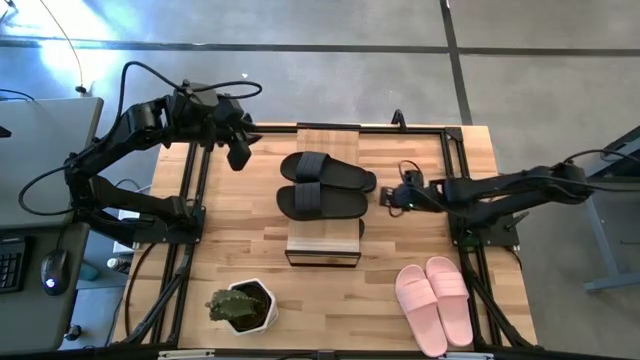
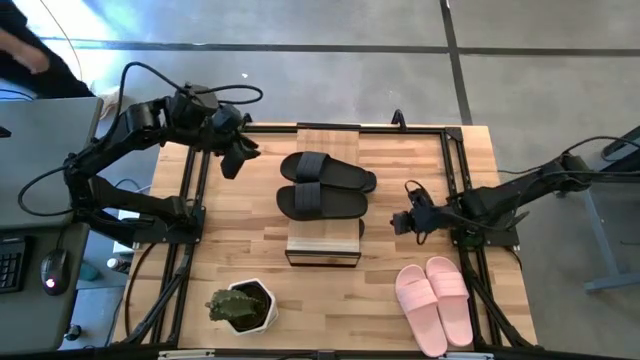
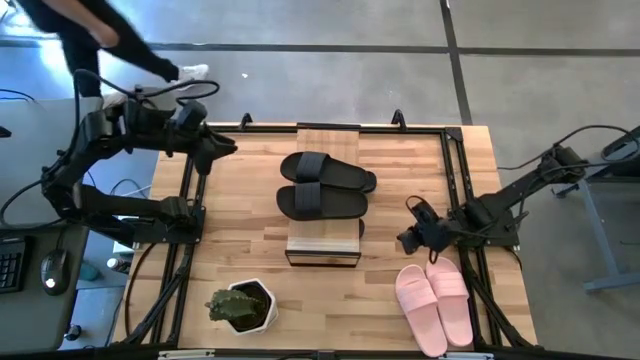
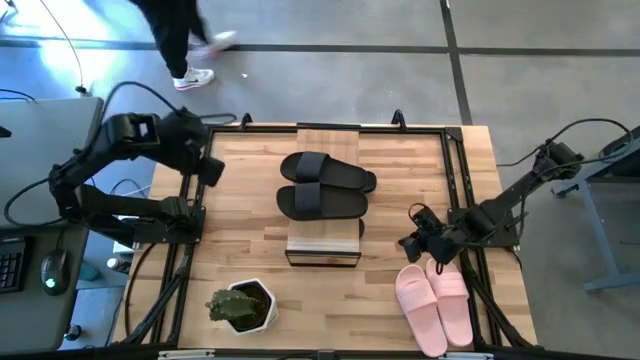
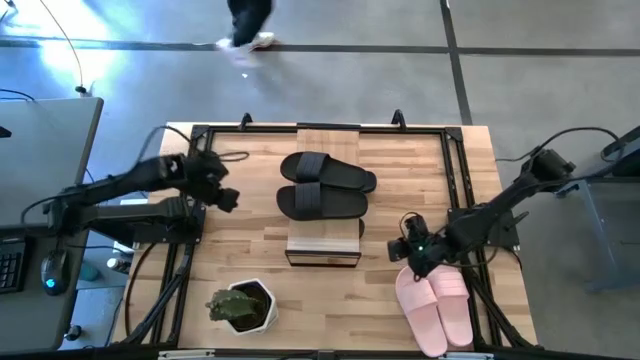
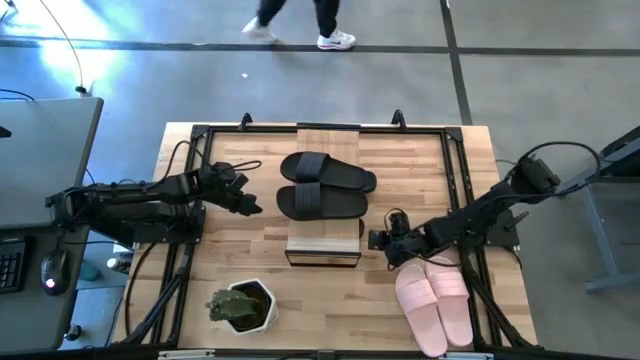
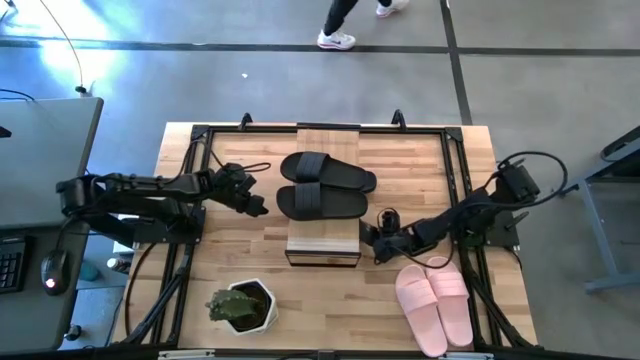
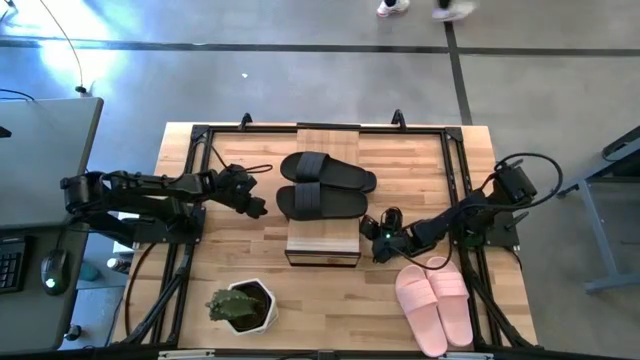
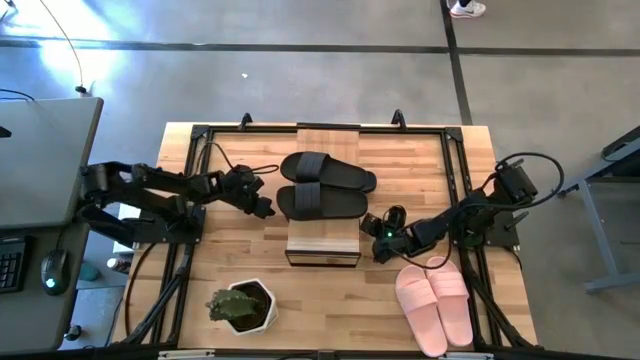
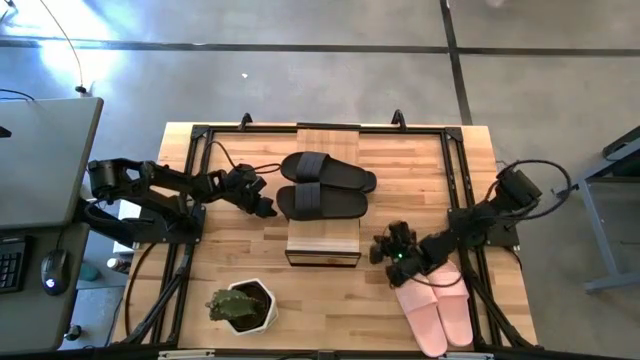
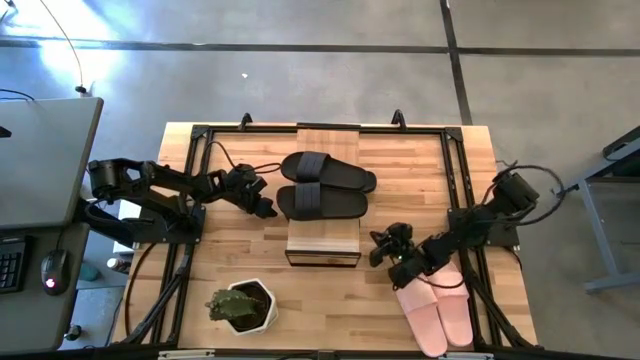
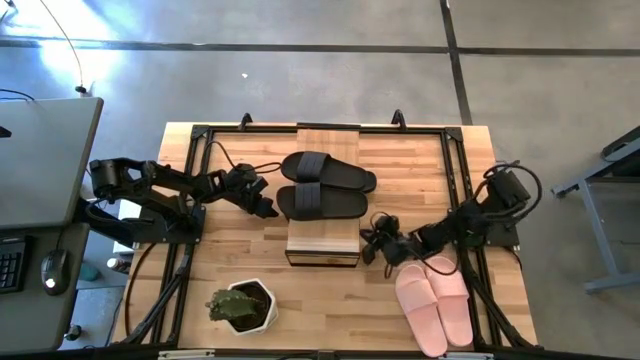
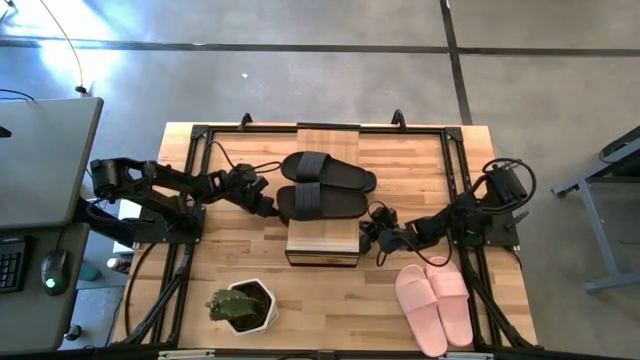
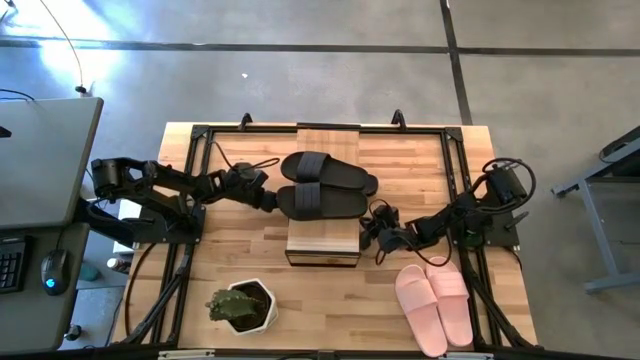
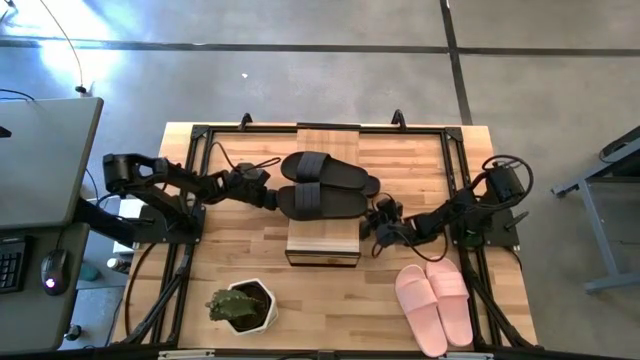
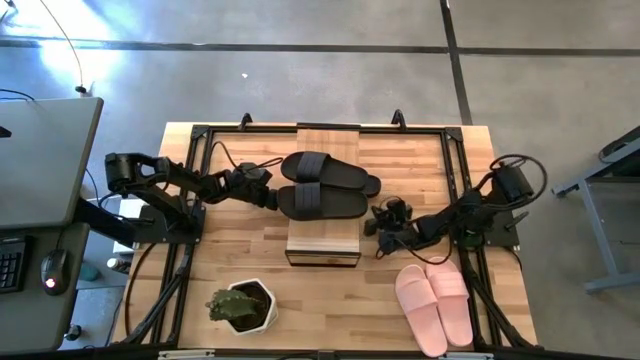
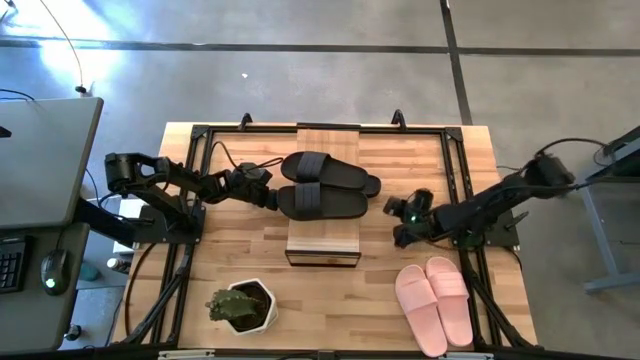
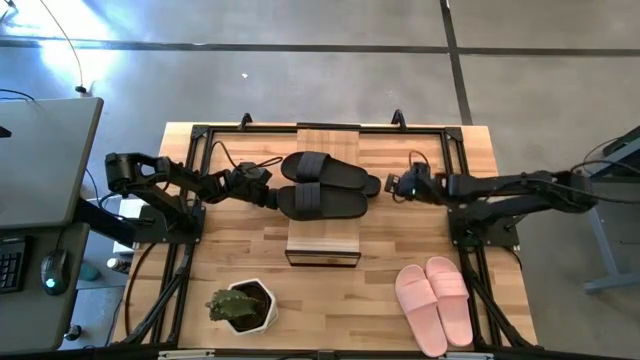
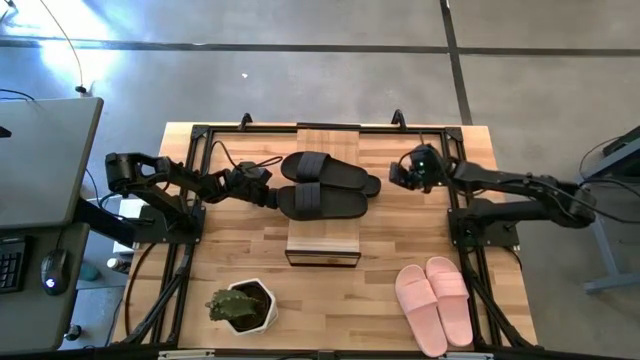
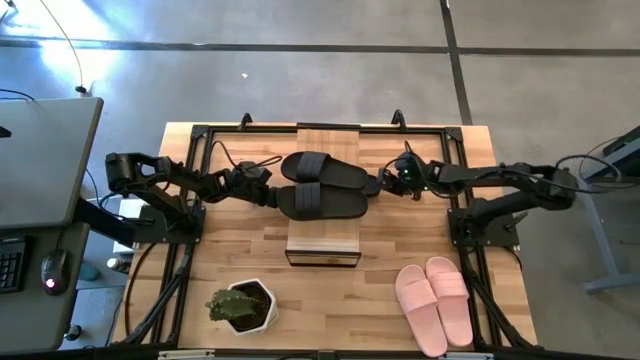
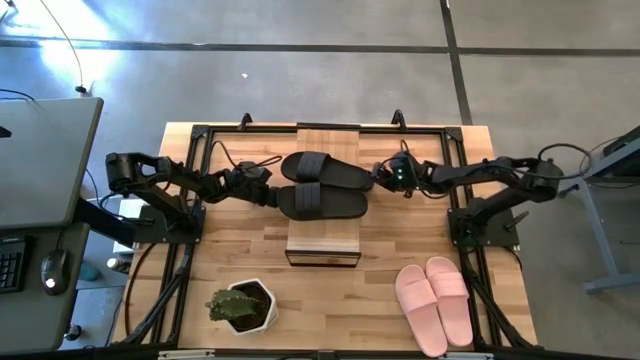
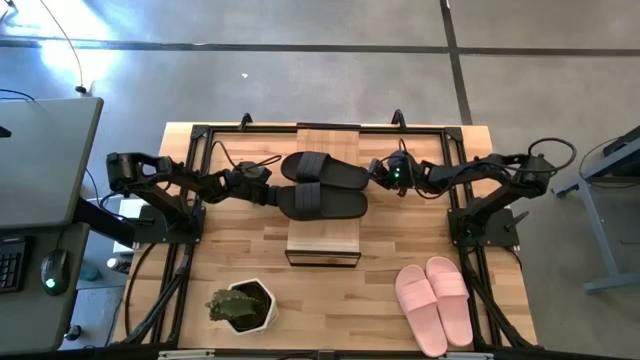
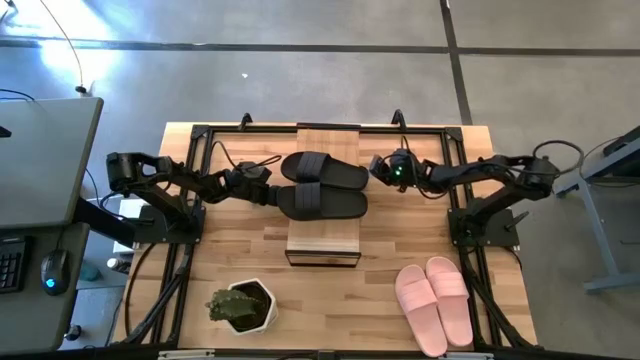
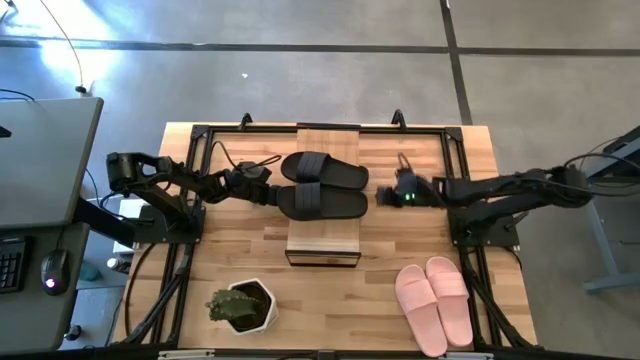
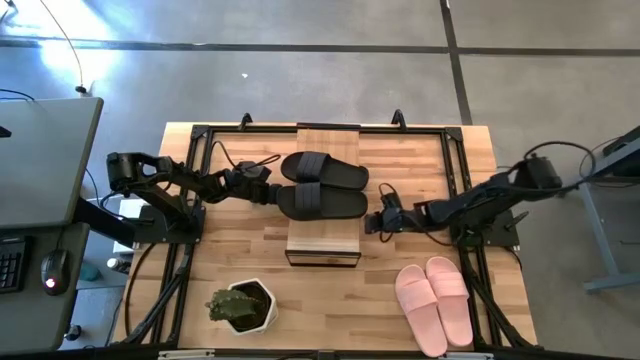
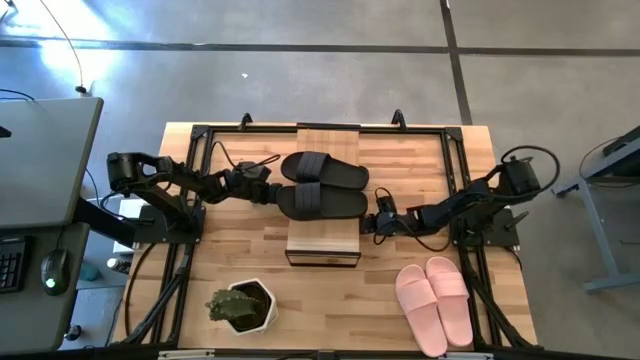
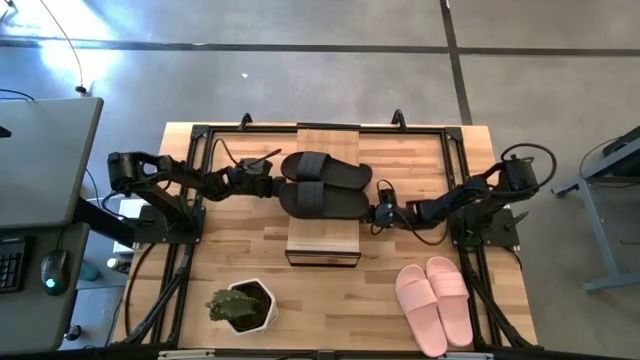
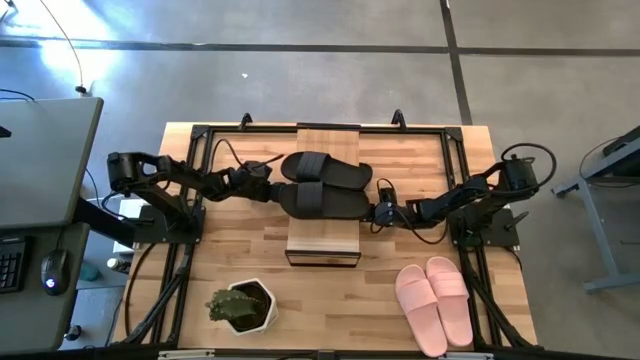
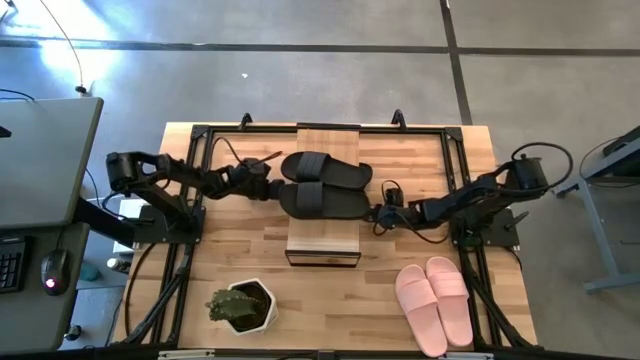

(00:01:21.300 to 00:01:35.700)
Task: Pick and place slides into the shelf
Adjust the black slippers under the shelf

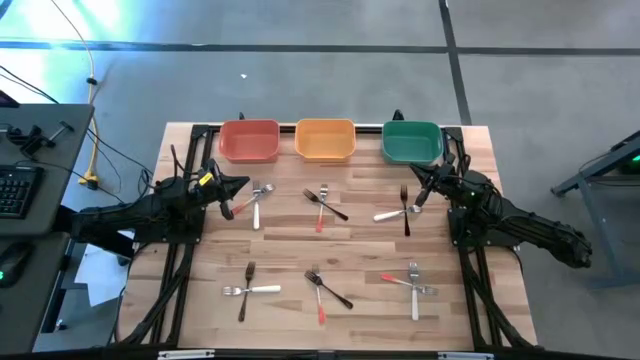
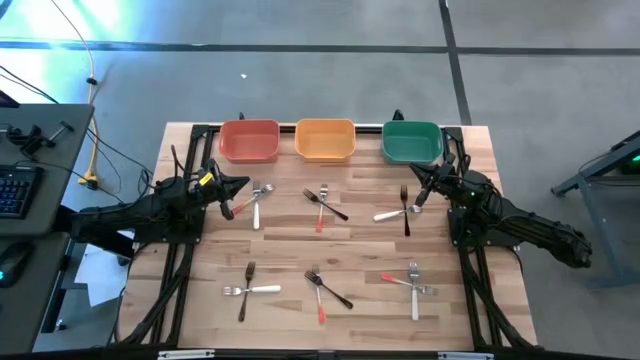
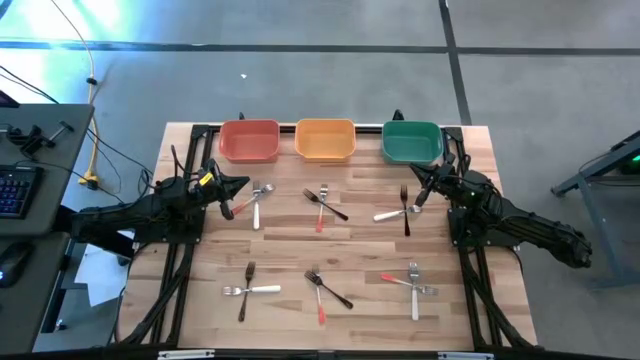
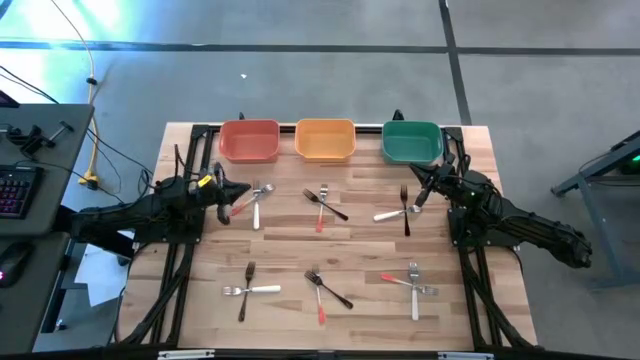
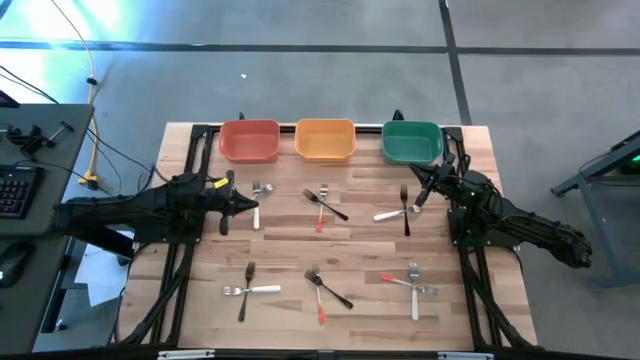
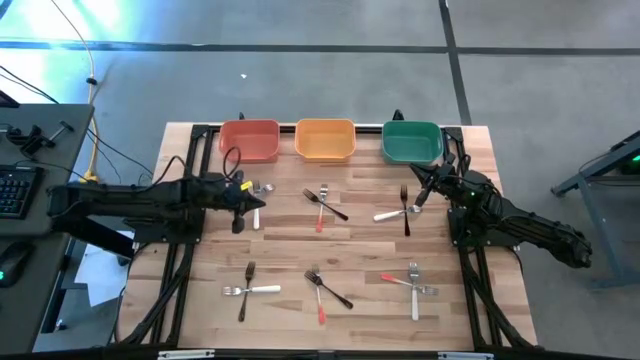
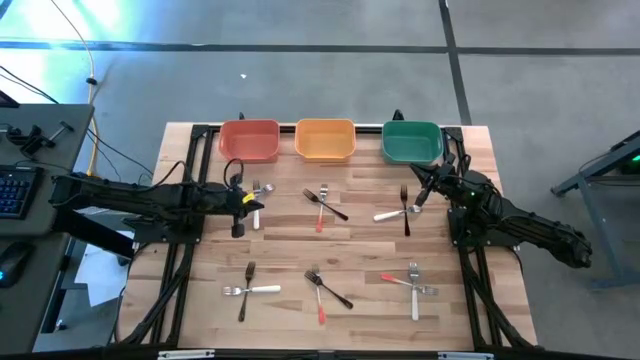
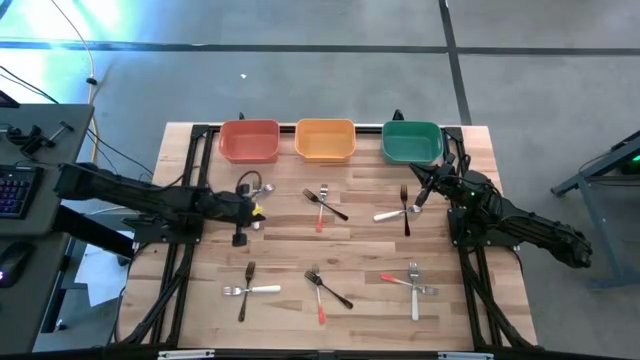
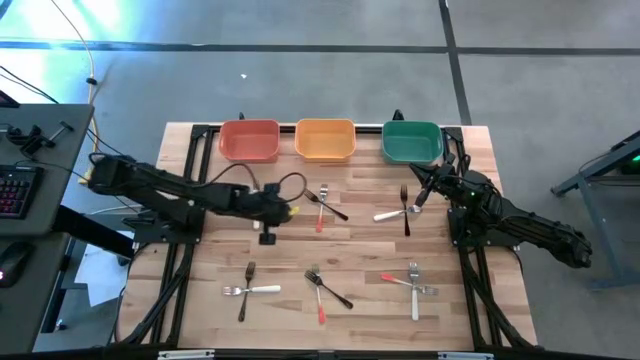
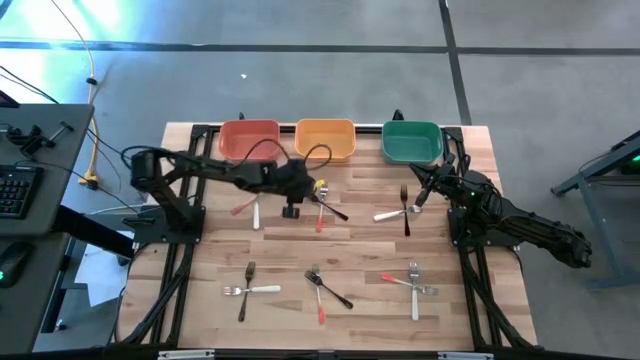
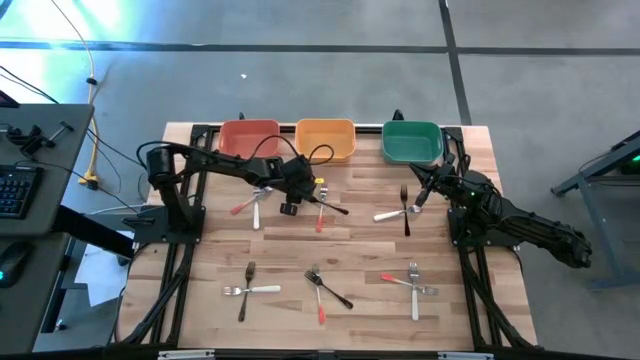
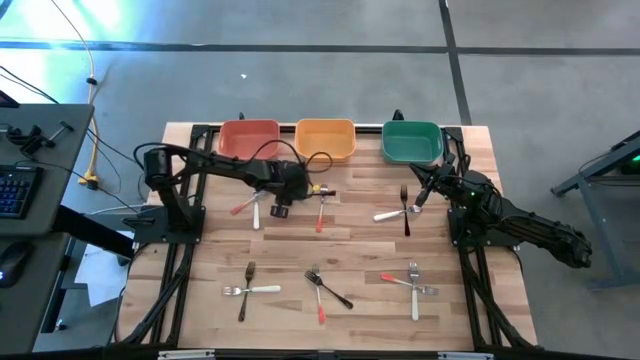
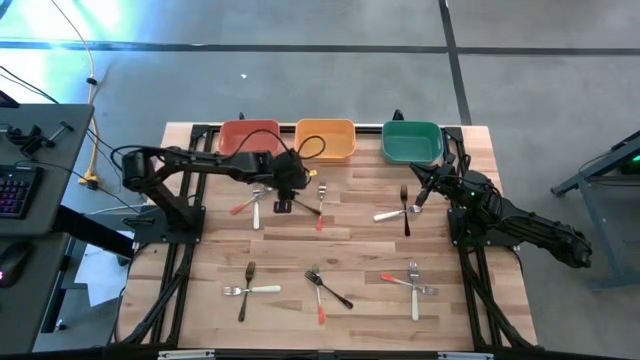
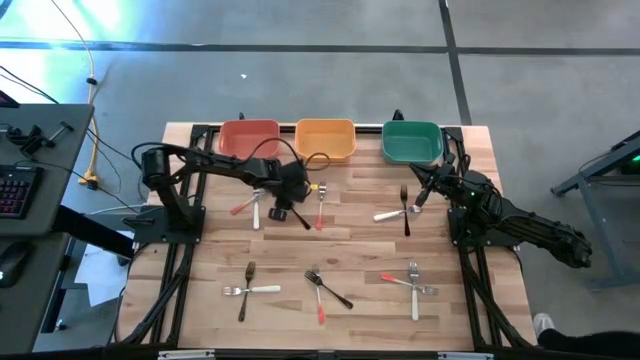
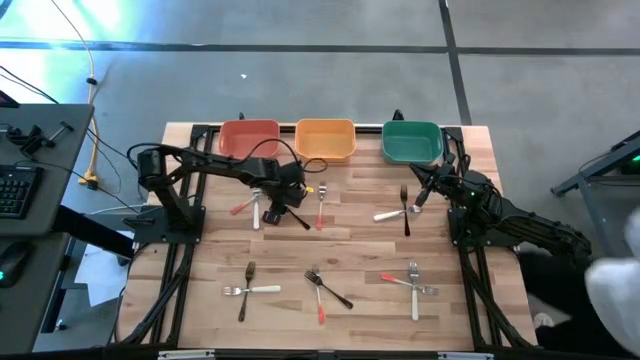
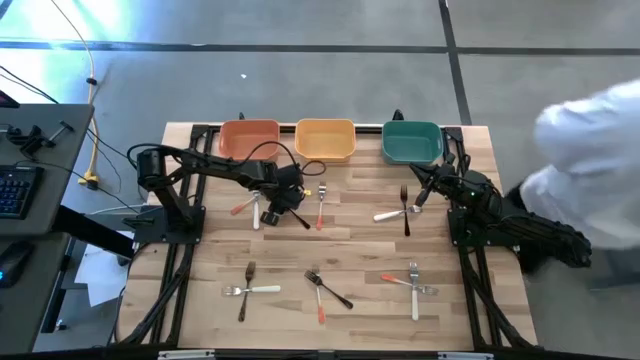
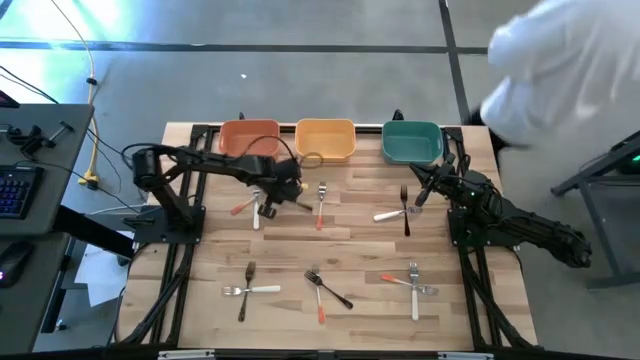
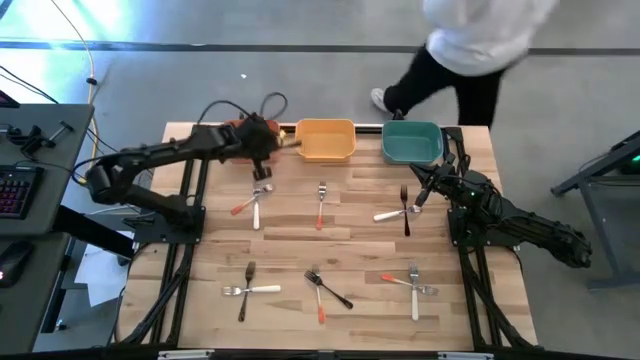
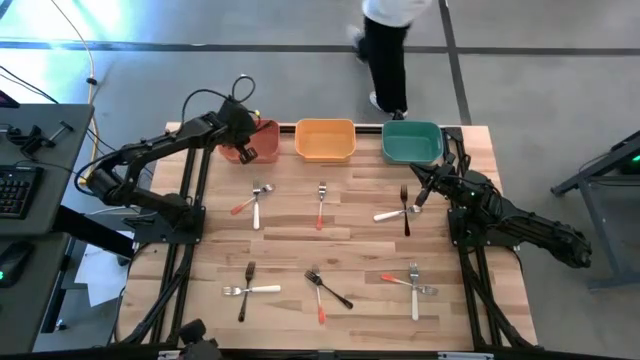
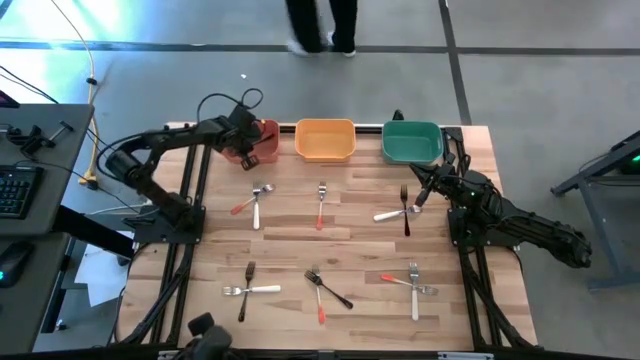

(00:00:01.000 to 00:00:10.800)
Task: Sort silverware by color (type)
Put the top left black fork into the orange bin
